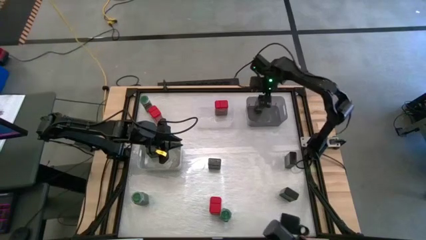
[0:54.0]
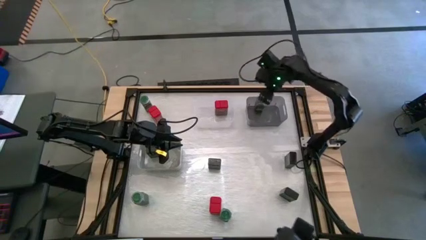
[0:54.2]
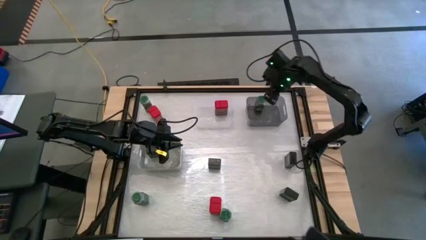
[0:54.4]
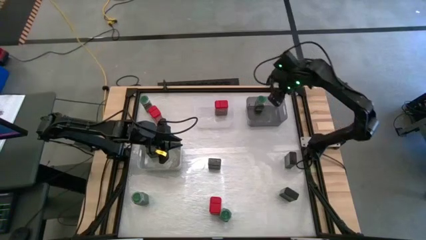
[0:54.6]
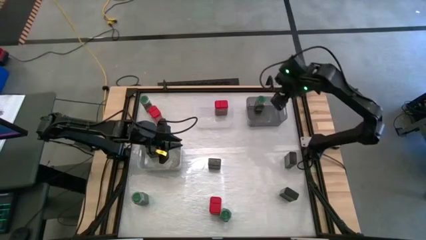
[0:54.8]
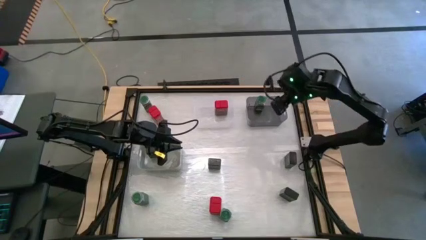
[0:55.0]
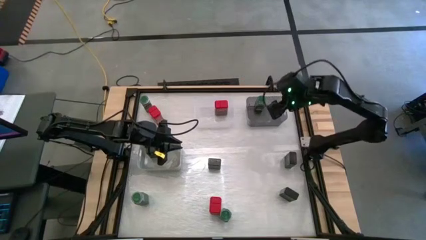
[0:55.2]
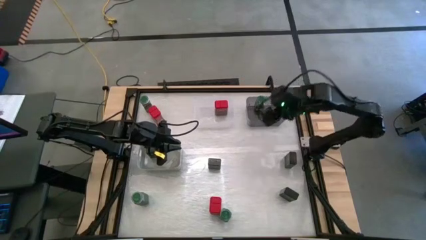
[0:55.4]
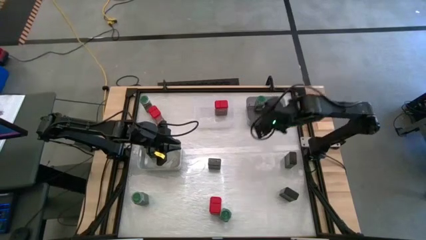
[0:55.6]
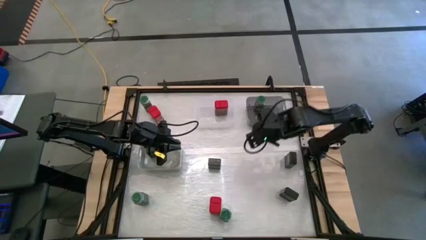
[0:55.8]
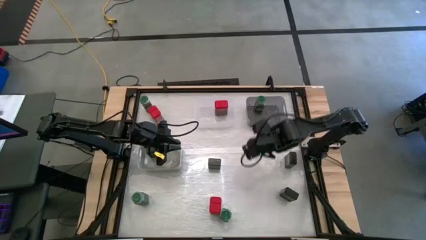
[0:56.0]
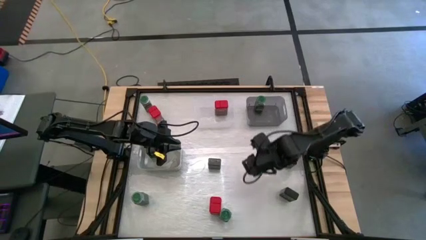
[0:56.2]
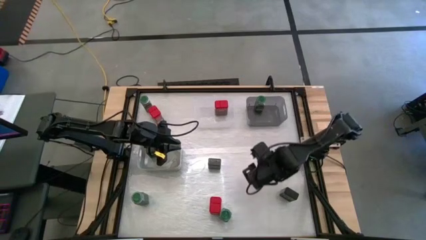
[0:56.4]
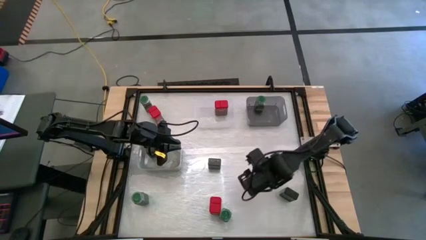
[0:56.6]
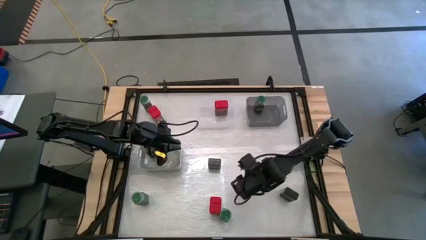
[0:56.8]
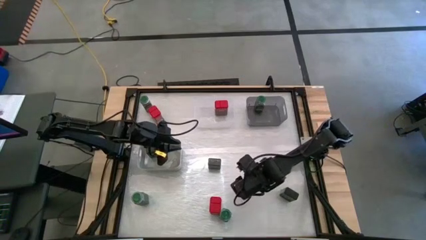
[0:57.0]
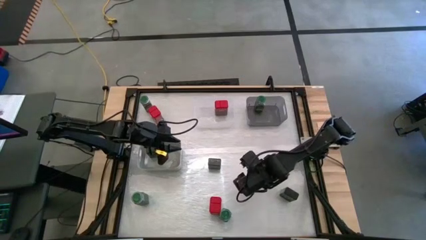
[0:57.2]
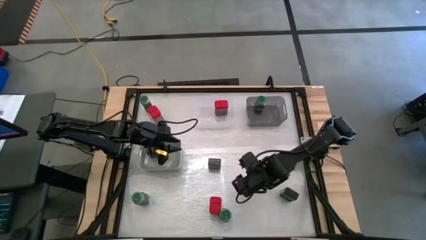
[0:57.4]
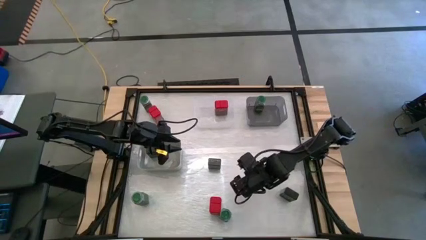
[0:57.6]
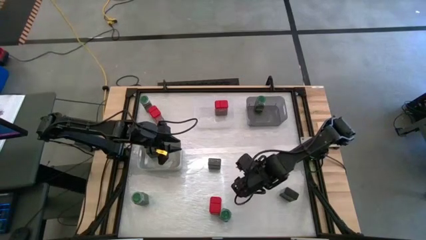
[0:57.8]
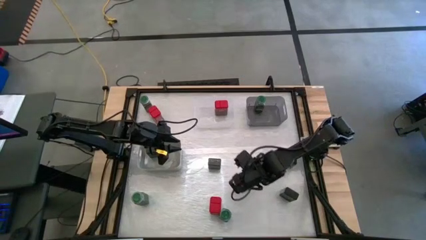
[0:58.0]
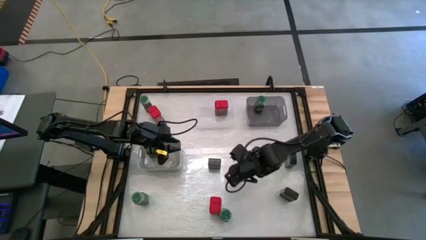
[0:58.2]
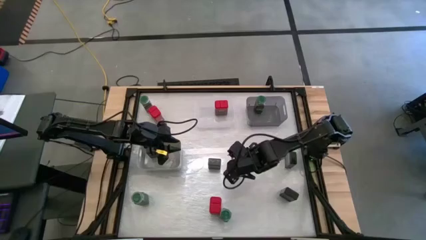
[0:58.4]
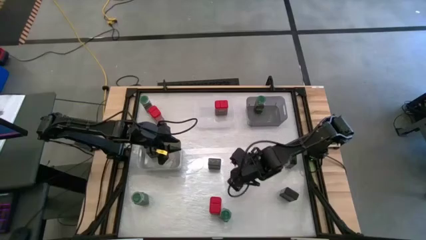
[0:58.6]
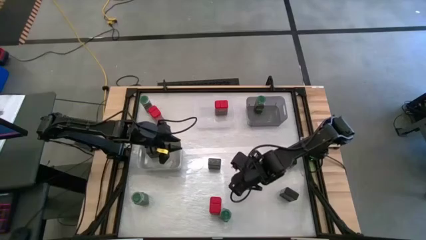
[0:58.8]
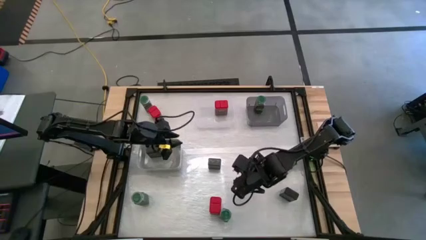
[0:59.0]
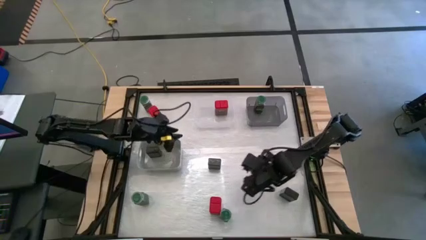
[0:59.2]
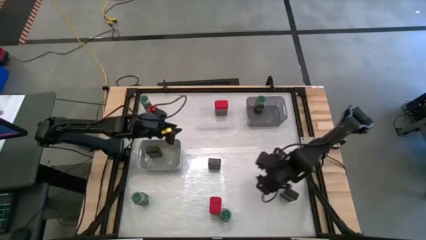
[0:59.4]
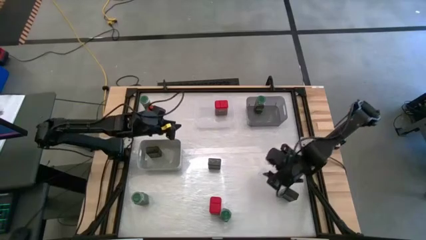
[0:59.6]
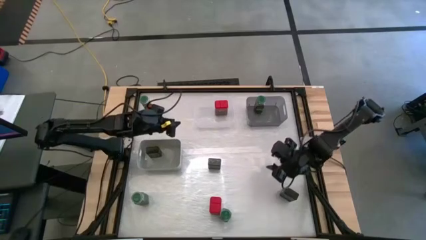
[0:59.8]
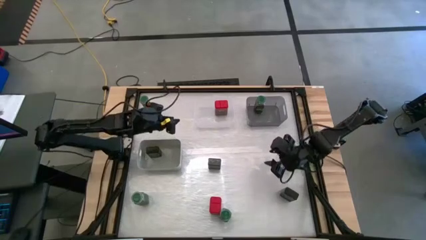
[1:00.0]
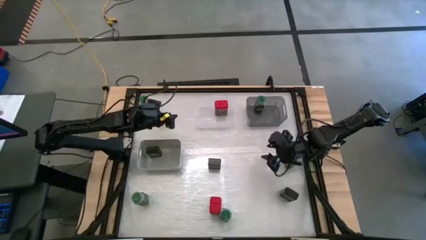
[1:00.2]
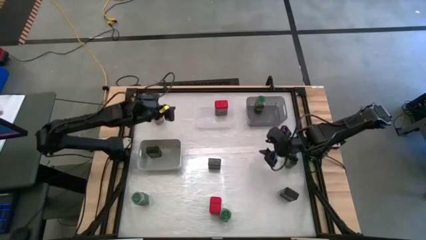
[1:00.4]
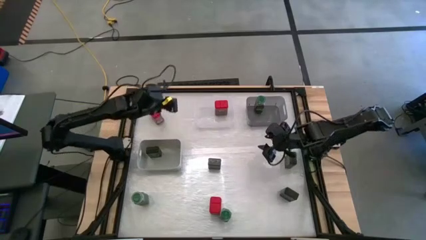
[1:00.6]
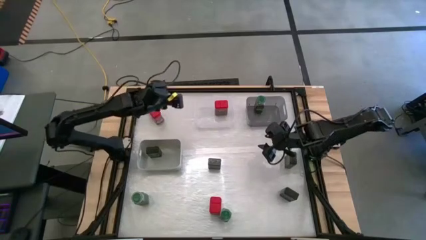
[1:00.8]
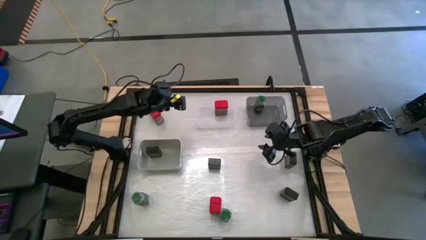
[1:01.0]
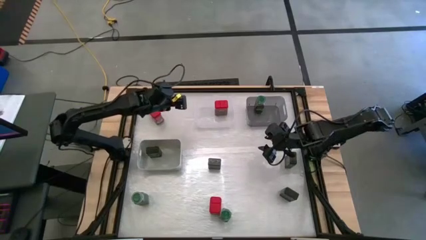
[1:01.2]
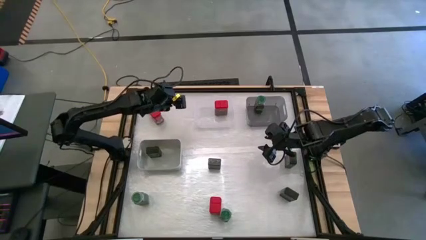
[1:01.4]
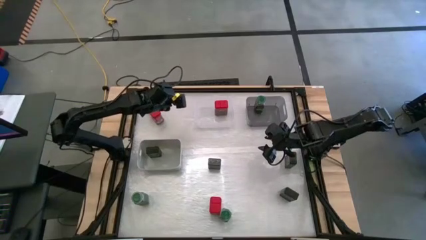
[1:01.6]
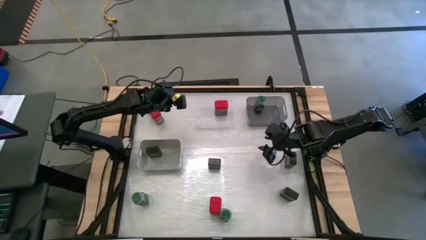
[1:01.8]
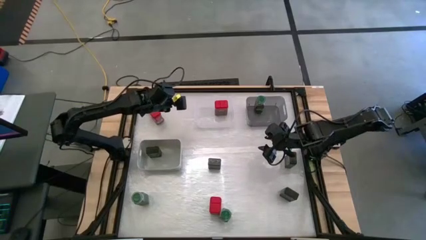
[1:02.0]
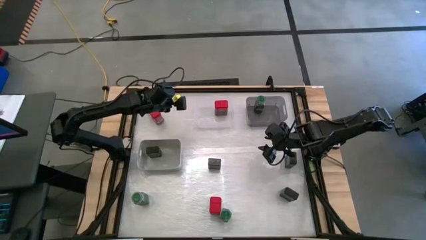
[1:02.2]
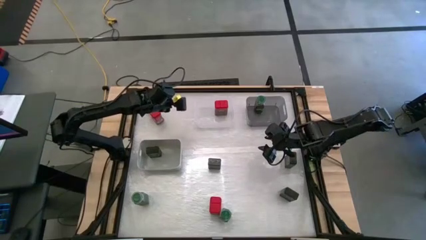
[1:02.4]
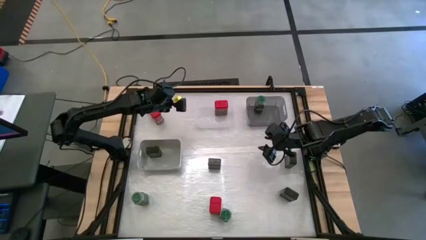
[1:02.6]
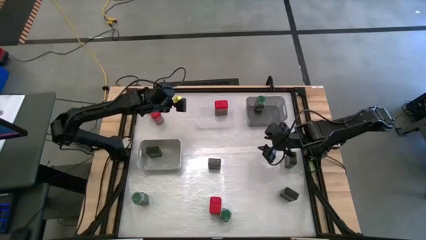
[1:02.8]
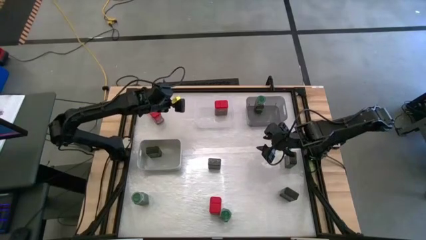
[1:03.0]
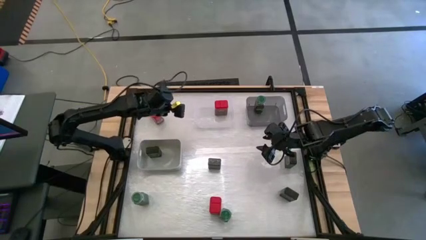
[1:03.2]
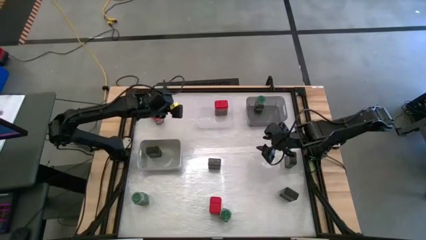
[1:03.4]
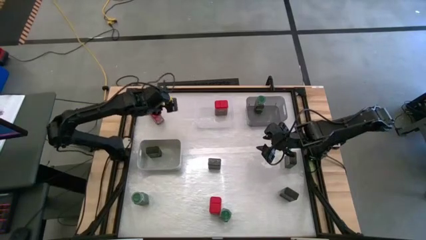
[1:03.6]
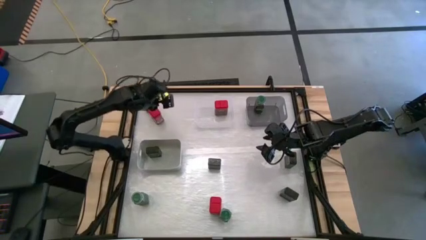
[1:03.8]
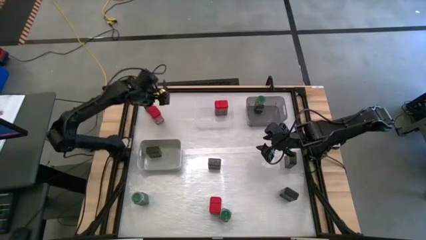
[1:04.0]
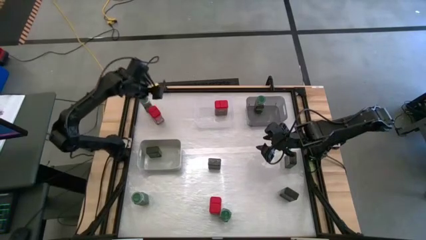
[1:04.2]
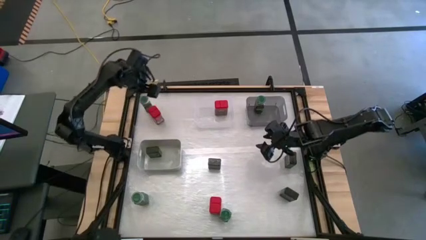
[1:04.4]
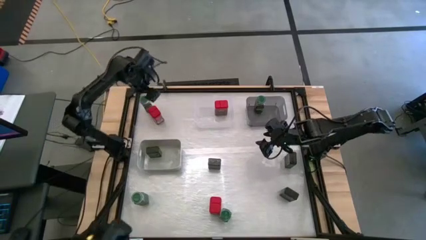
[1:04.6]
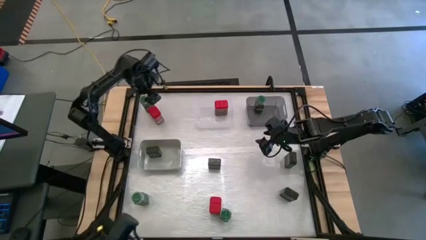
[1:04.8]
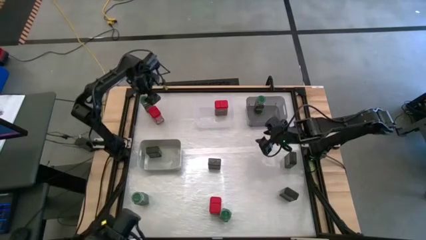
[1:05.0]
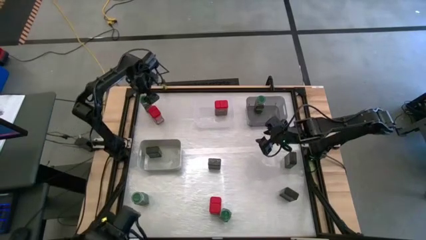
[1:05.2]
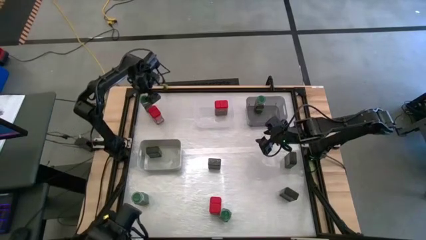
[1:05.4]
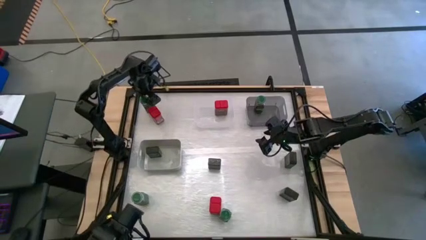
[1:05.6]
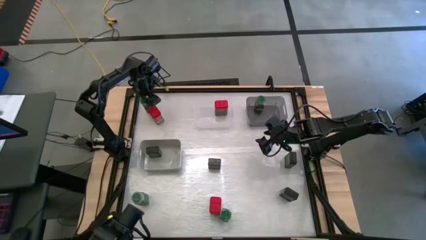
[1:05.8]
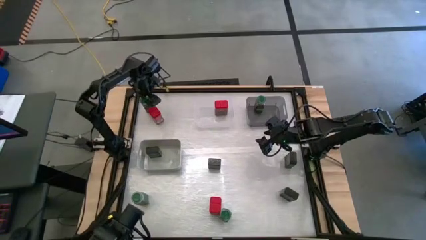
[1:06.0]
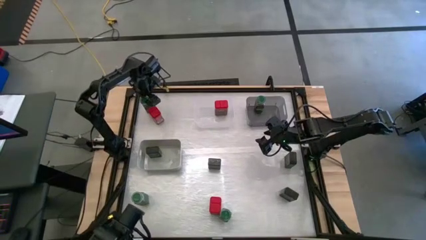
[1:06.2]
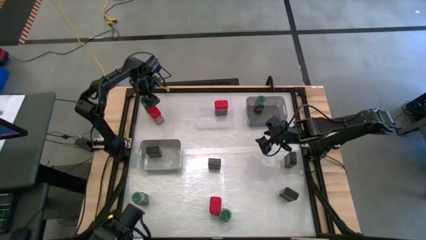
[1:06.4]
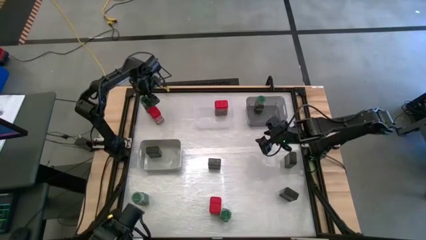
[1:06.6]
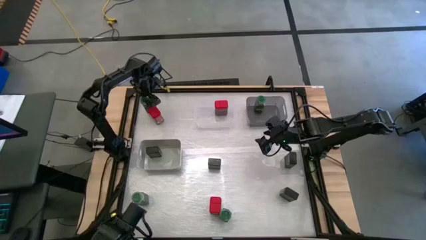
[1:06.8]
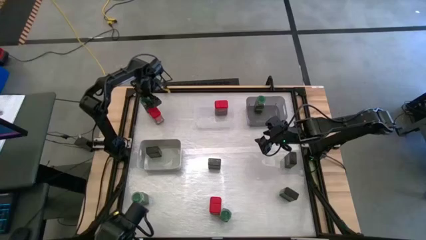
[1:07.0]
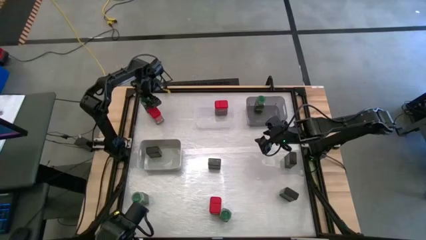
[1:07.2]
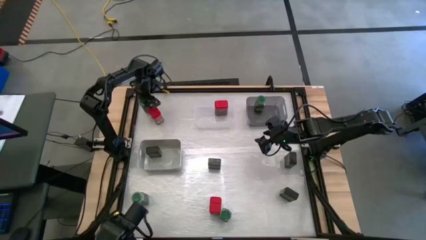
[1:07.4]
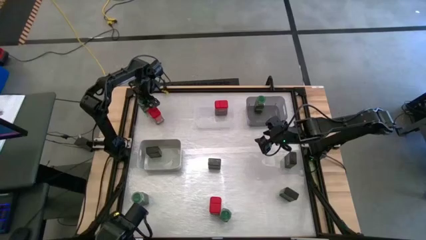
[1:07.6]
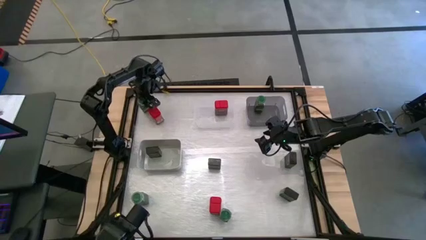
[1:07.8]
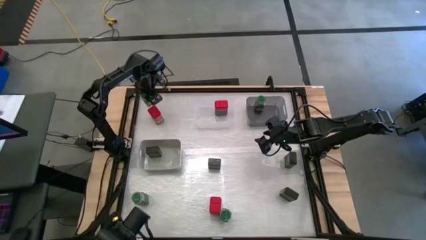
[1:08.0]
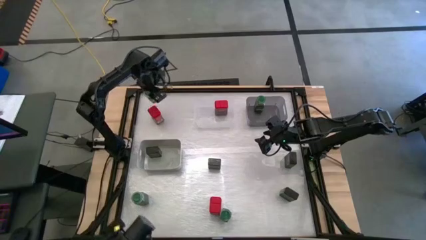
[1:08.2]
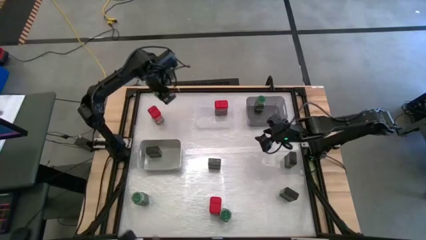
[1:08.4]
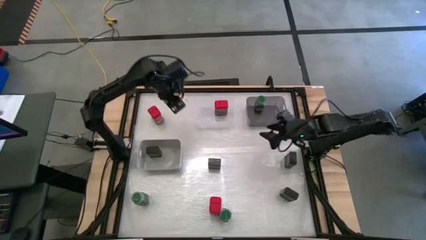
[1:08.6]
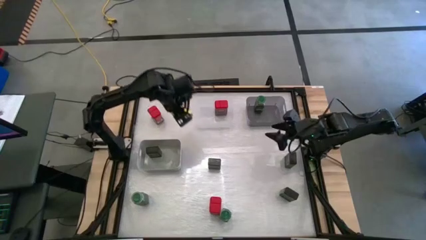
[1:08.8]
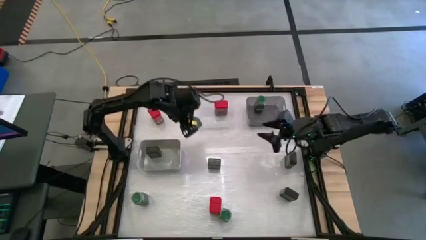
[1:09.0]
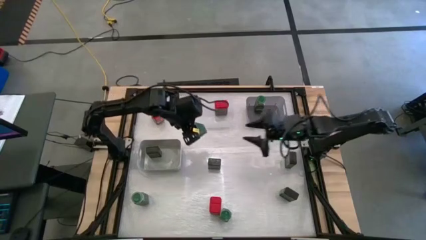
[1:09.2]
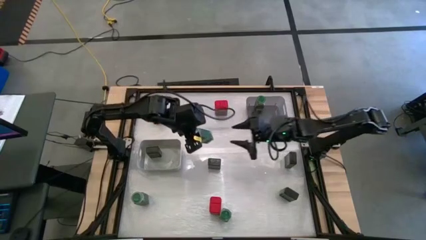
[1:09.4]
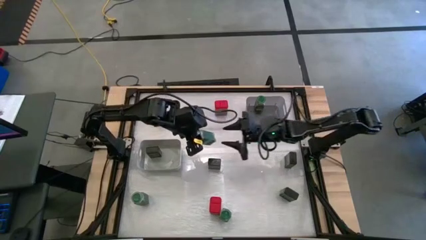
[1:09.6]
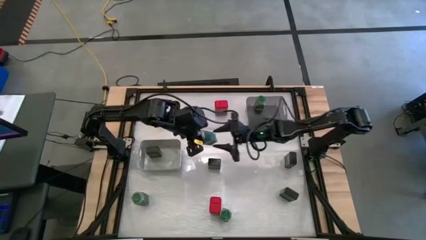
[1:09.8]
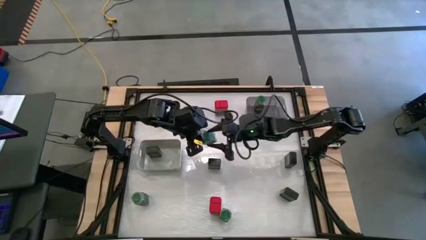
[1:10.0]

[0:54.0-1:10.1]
Task: Sort spices by type
Put the green seasoning bottle into the black bin

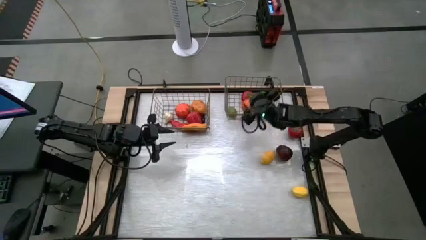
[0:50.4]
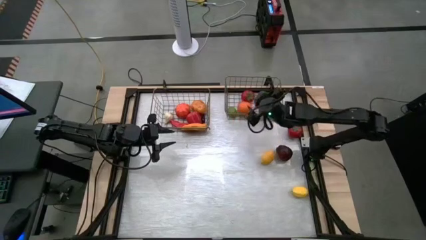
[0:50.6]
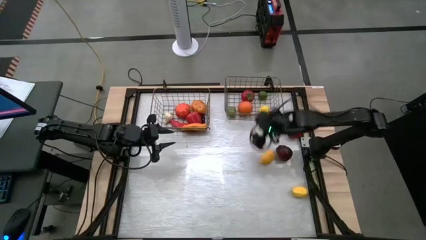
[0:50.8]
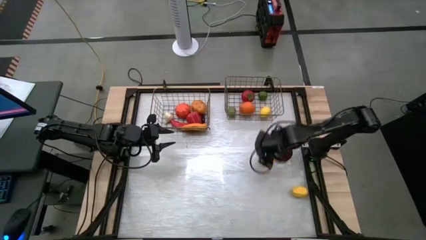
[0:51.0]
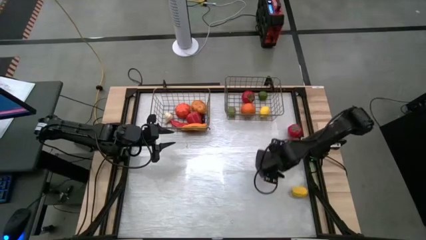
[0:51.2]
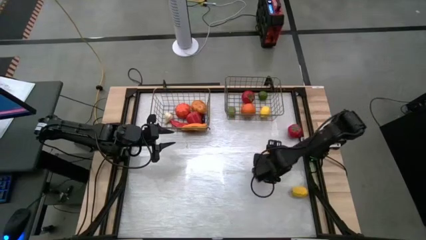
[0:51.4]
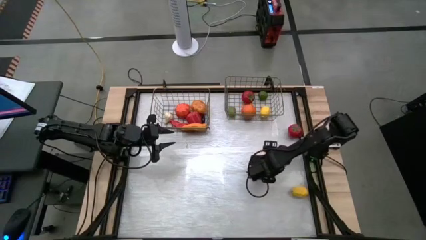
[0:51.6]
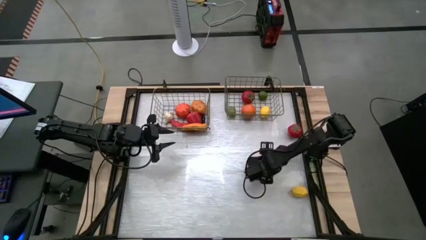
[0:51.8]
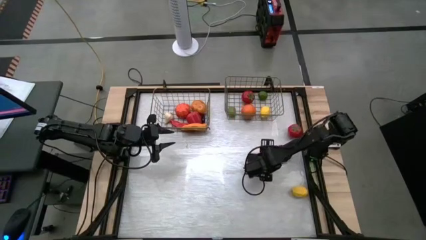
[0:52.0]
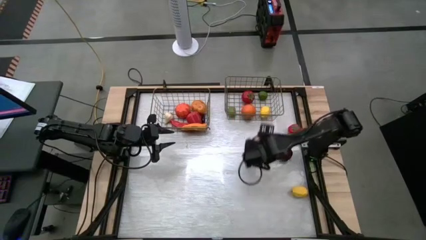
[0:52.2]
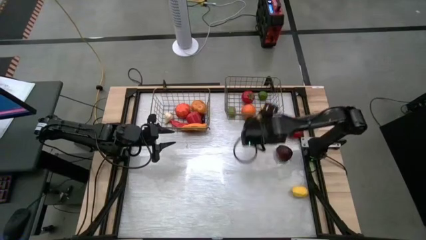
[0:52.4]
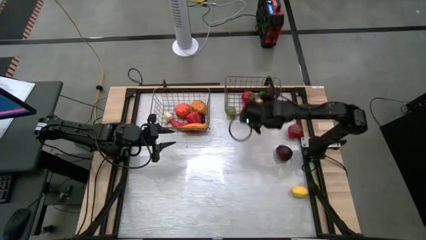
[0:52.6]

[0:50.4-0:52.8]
Task: Sort produce into baskets
Put the top yellow lemon into the right gold wire basket
